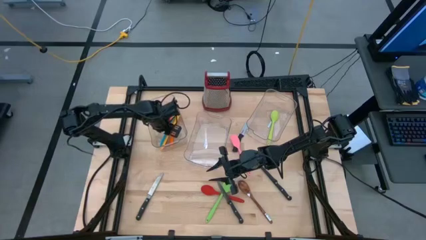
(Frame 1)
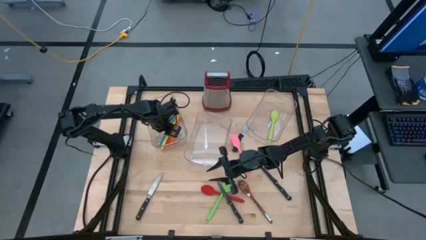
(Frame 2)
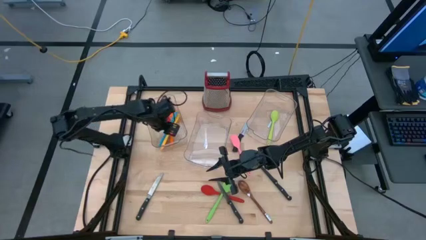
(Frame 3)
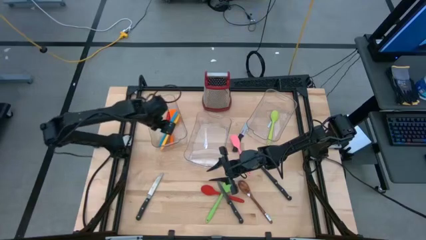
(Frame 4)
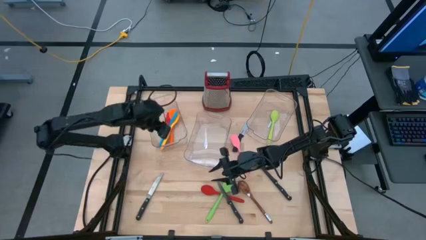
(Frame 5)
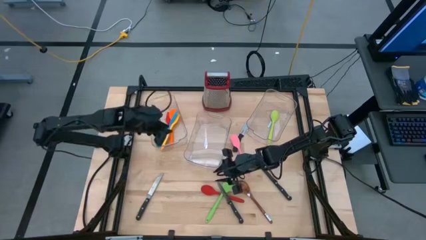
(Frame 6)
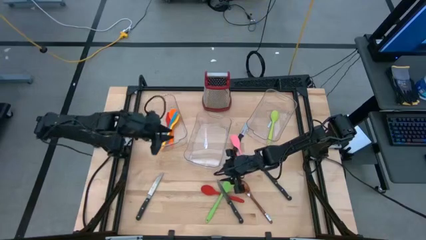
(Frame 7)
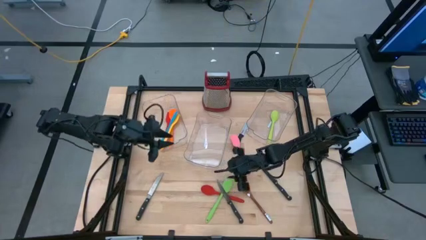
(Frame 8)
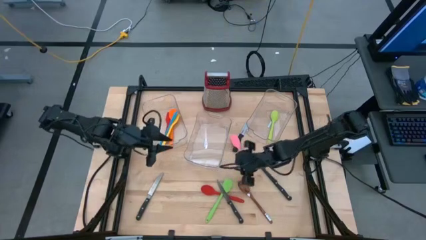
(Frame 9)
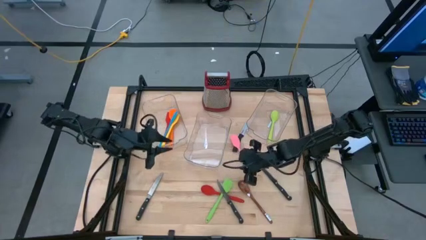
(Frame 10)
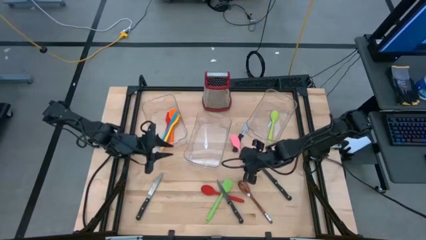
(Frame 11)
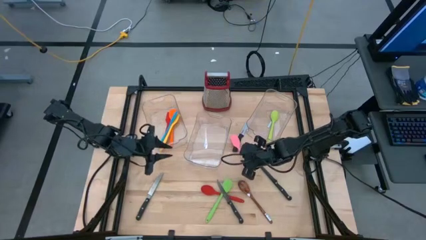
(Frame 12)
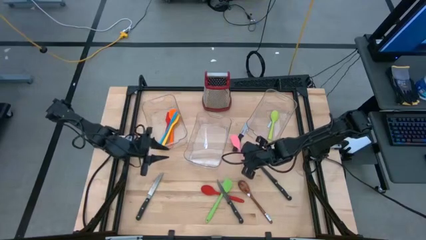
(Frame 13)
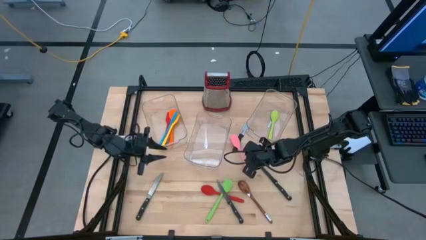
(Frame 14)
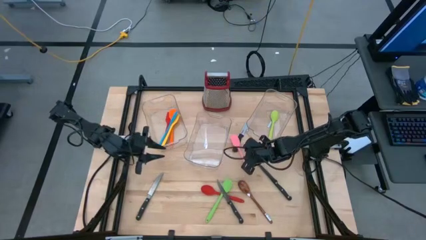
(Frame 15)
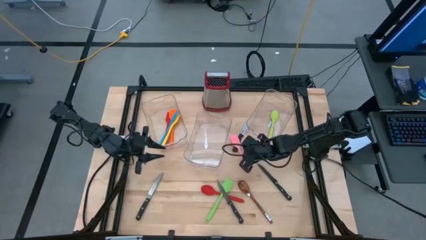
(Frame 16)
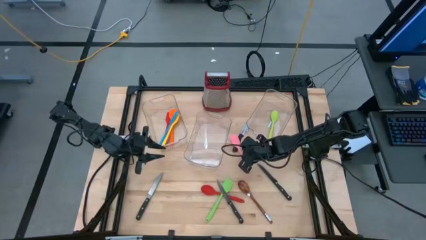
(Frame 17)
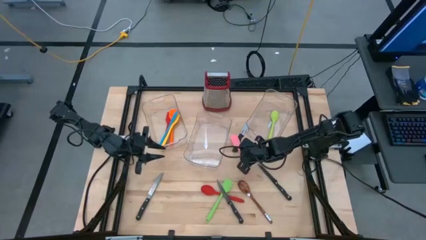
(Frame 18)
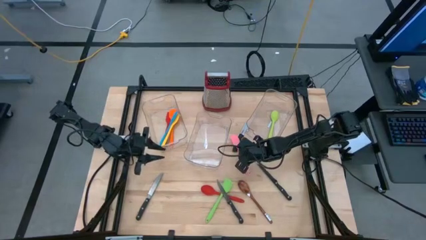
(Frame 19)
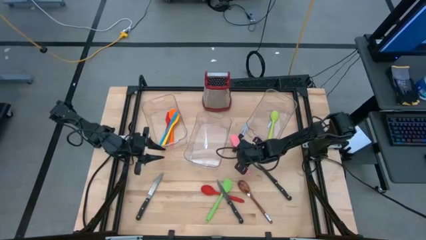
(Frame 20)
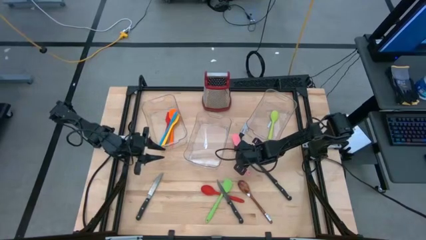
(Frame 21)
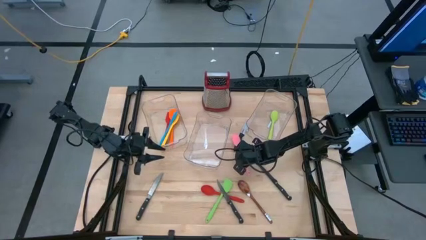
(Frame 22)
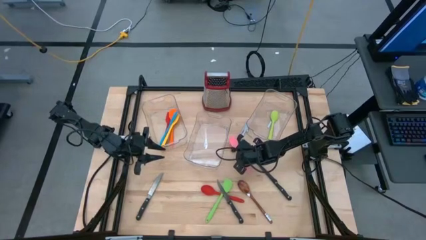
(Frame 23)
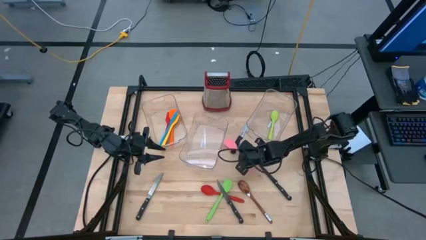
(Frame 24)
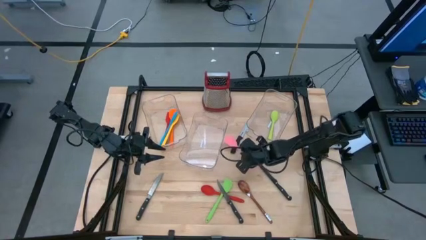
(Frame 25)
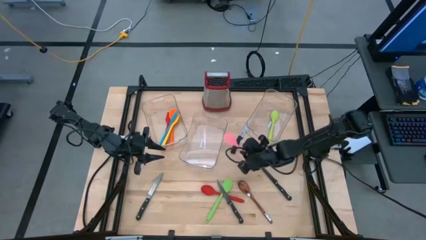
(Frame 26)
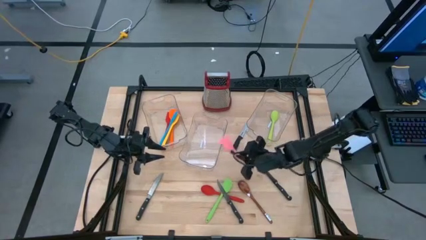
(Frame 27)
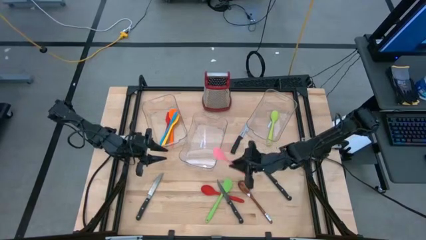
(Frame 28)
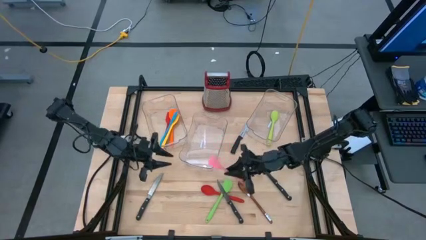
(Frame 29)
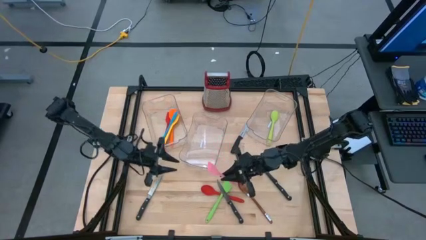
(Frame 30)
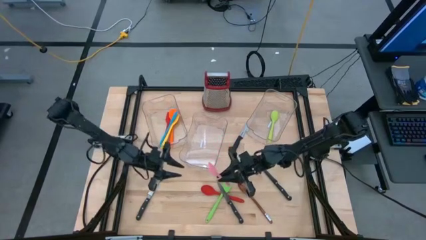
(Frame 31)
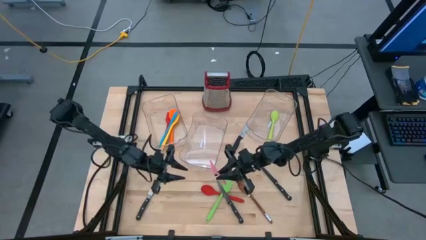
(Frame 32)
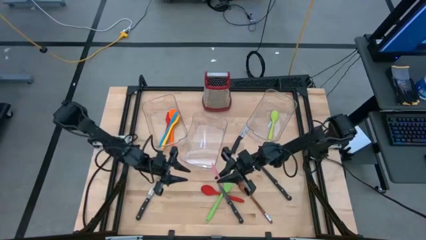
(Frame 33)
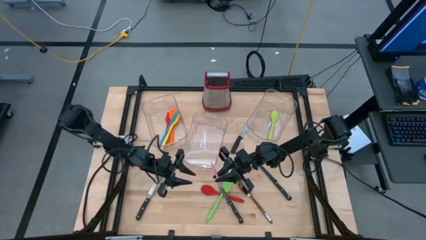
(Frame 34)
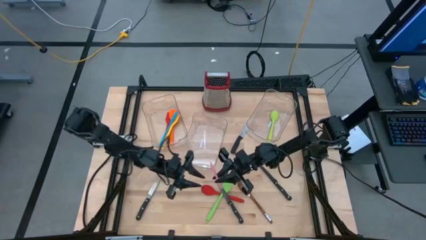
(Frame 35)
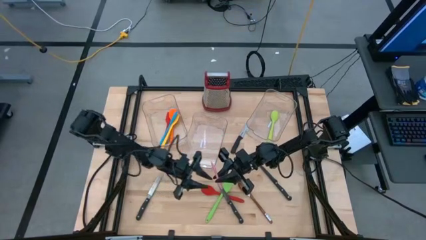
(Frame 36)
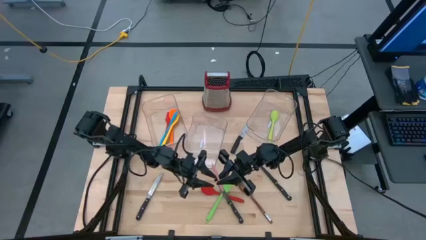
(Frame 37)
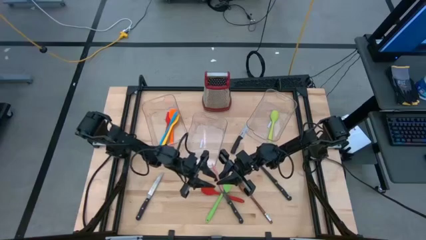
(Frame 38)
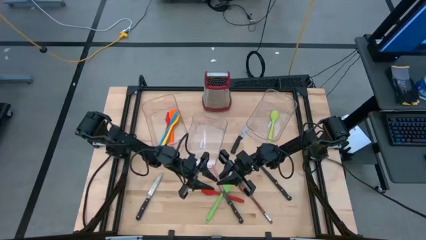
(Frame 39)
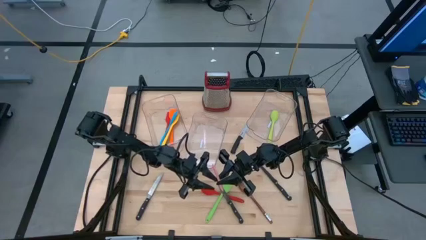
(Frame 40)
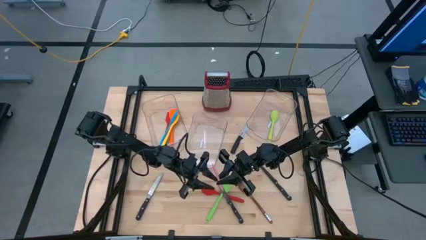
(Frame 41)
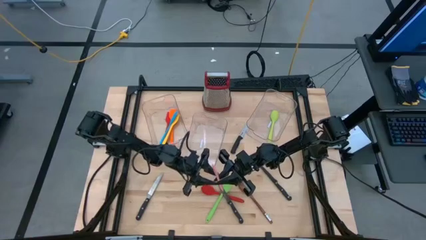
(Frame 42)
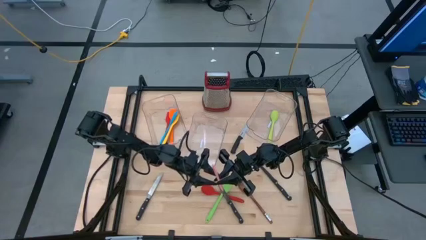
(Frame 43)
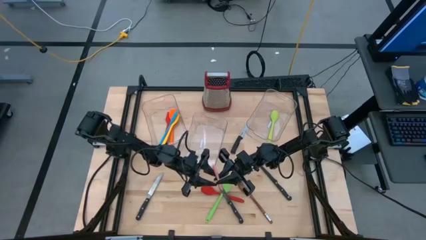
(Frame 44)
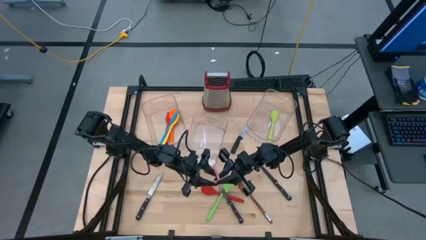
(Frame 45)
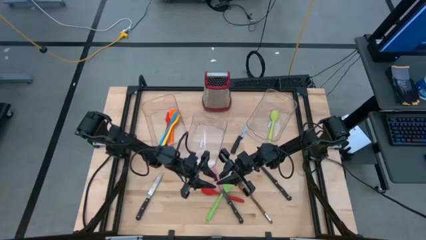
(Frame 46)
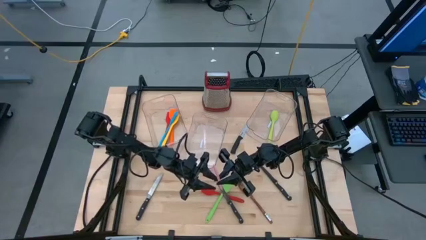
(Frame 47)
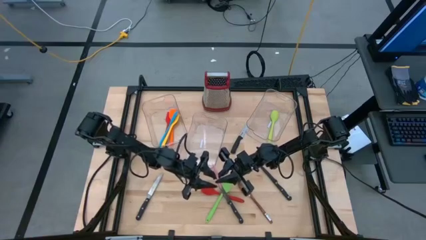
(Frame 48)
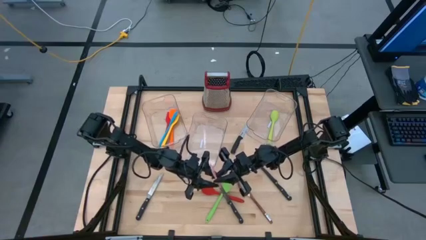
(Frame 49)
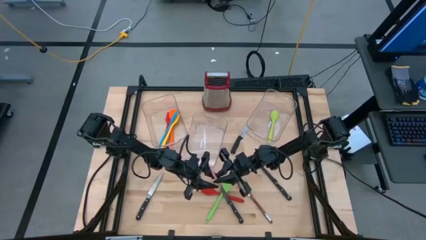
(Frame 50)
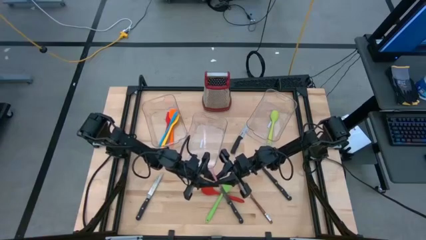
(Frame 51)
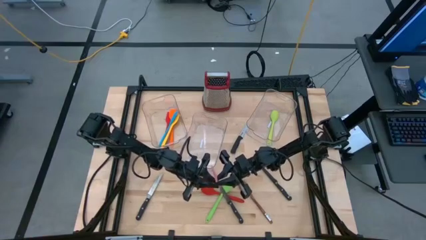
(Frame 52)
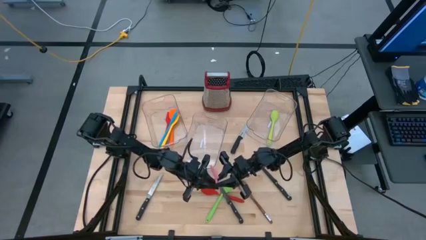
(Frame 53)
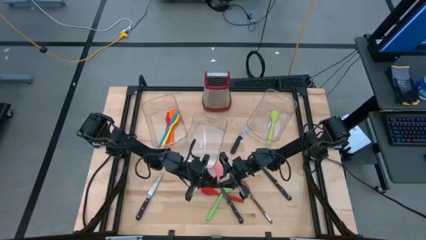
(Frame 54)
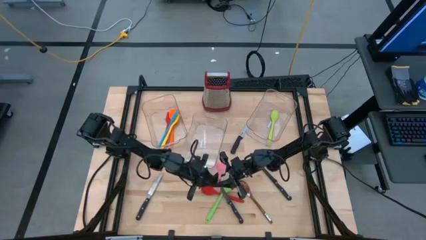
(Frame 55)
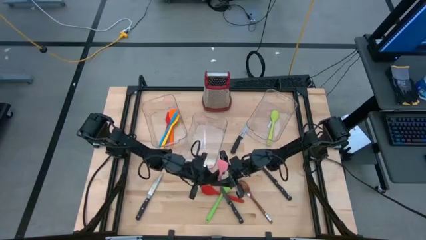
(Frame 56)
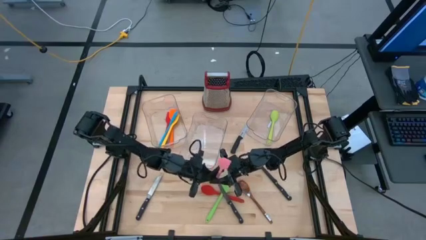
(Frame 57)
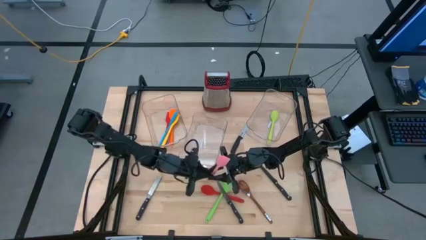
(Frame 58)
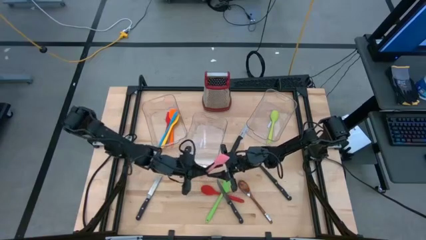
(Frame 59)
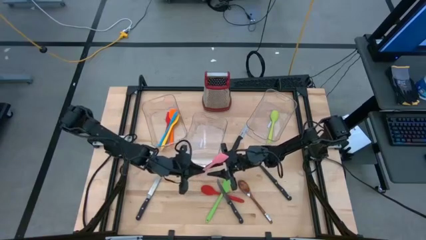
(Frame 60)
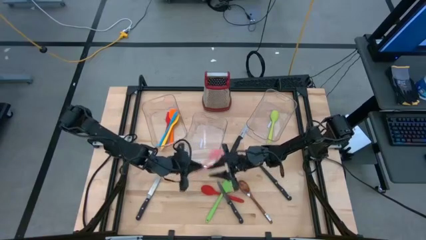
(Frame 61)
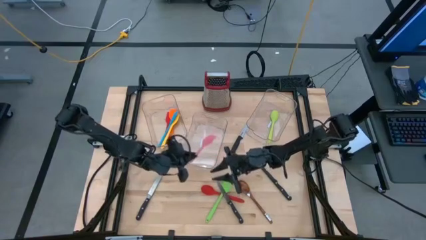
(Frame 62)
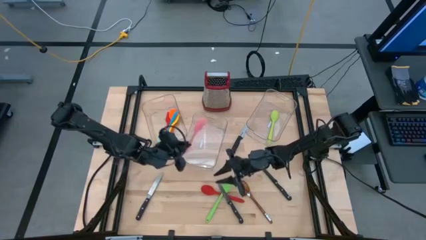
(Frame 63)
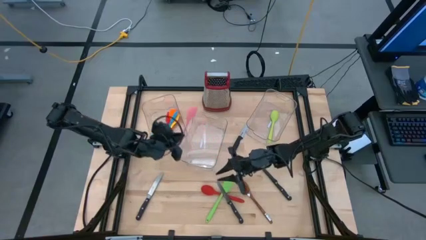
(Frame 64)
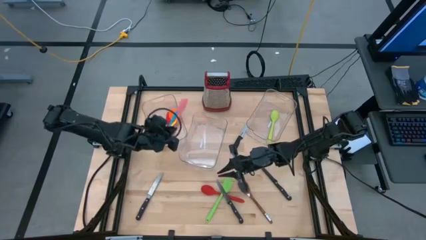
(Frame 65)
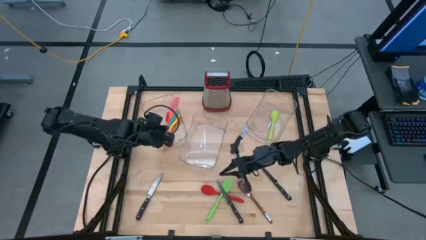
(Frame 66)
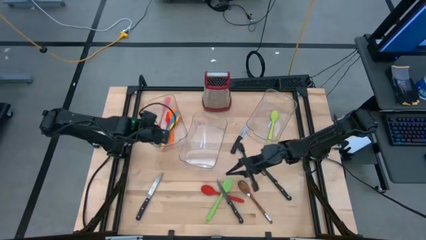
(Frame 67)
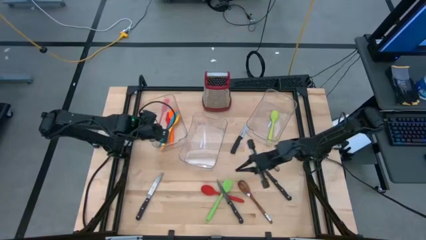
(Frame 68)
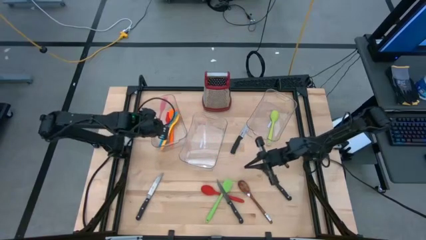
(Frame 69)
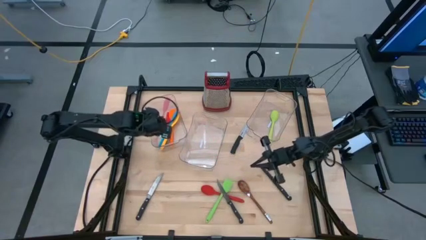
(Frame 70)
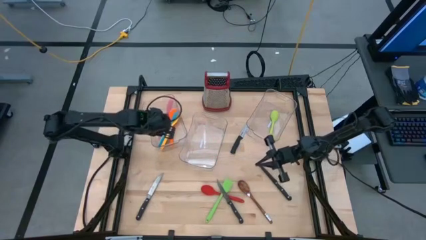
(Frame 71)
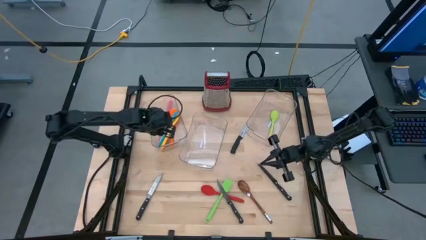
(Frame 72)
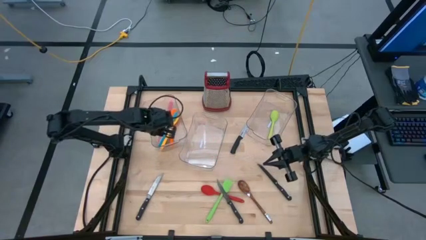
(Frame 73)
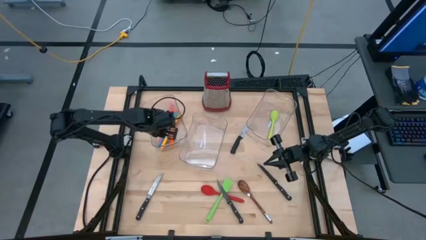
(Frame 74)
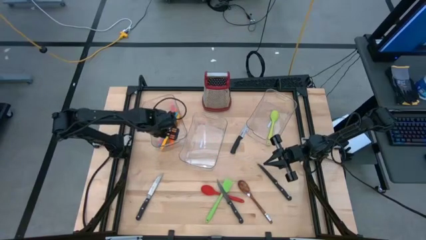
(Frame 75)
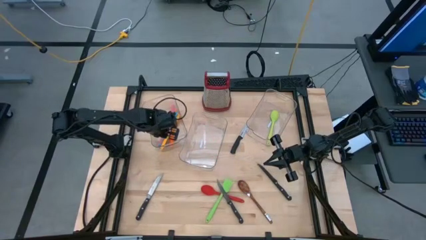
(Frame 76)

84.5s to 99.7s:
Task: Pick & Place Kitchen Items
Put the pink spatula into the left transparent bin
